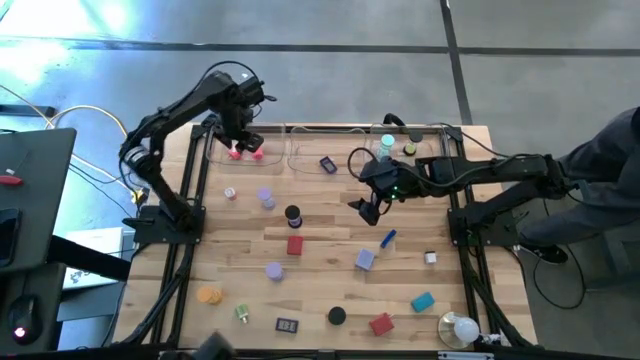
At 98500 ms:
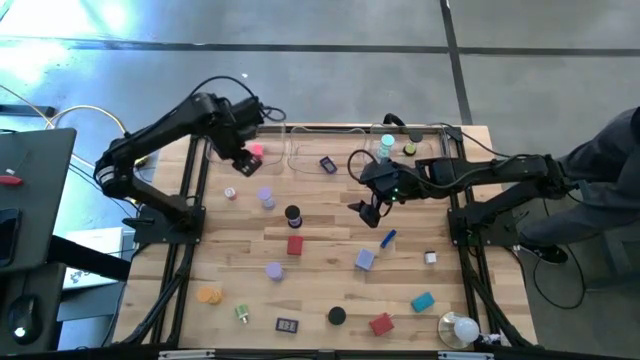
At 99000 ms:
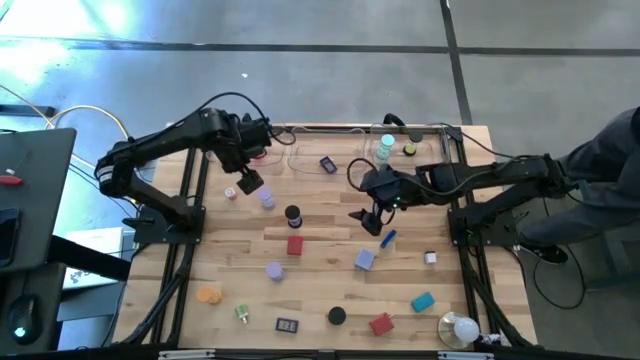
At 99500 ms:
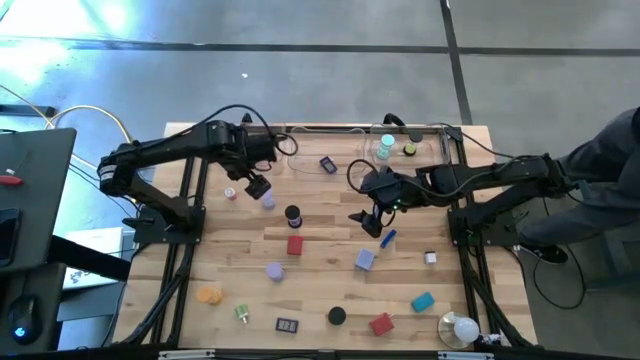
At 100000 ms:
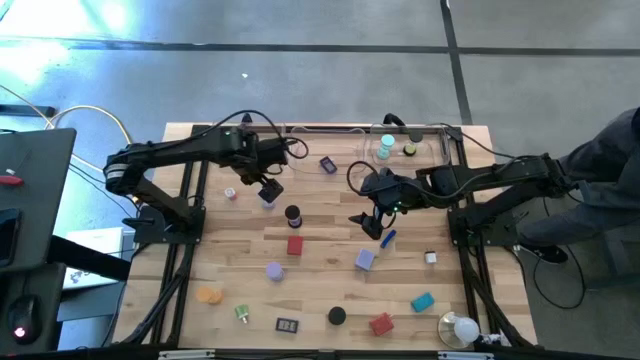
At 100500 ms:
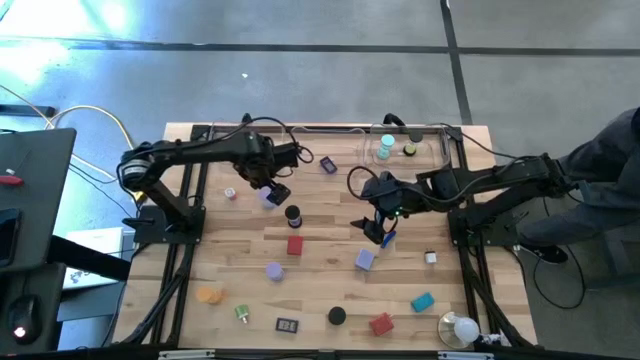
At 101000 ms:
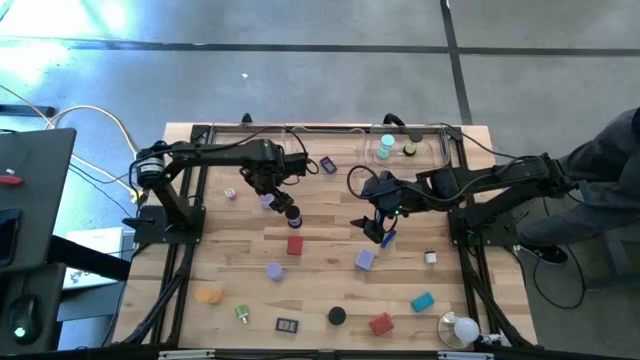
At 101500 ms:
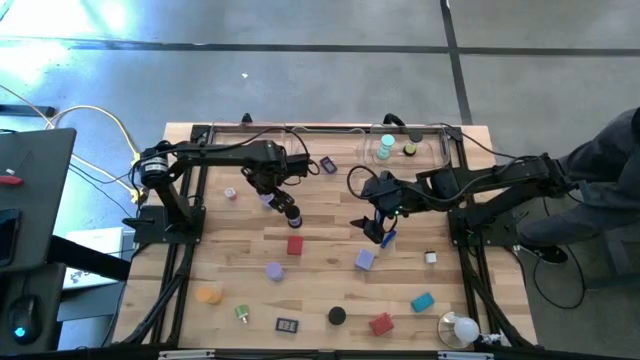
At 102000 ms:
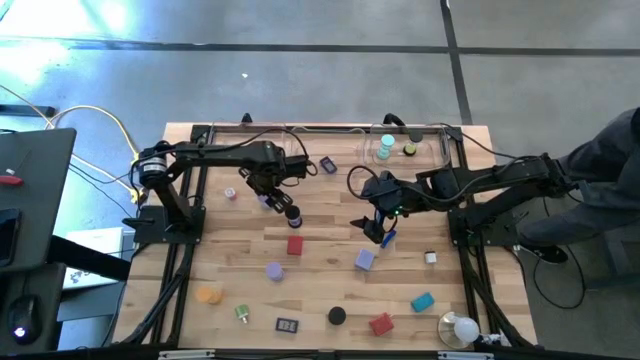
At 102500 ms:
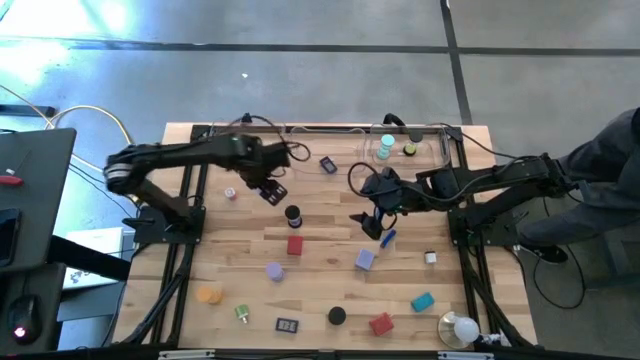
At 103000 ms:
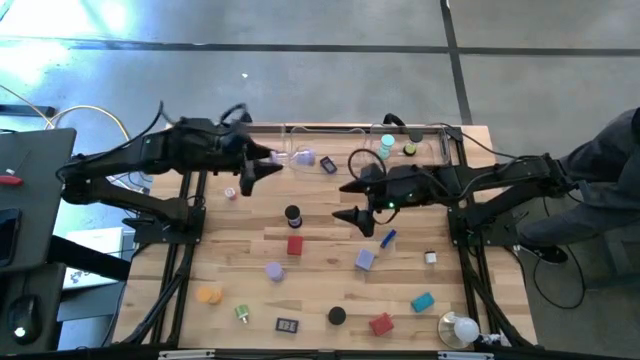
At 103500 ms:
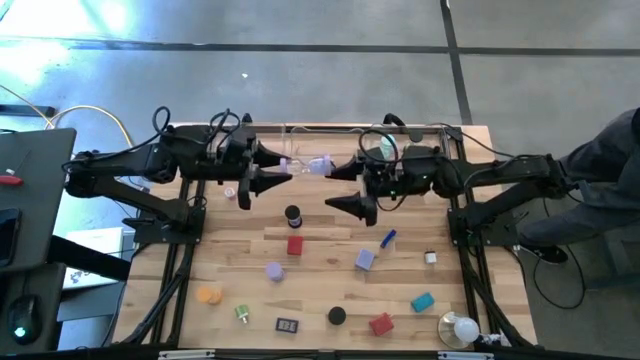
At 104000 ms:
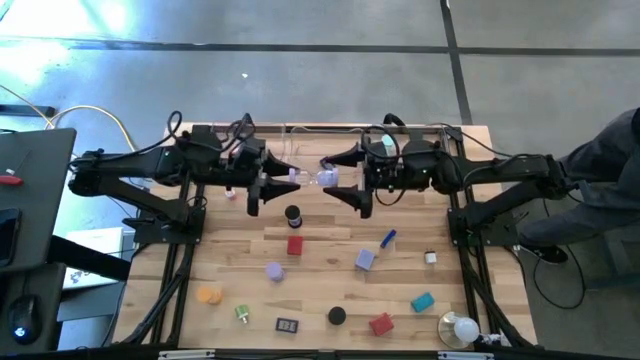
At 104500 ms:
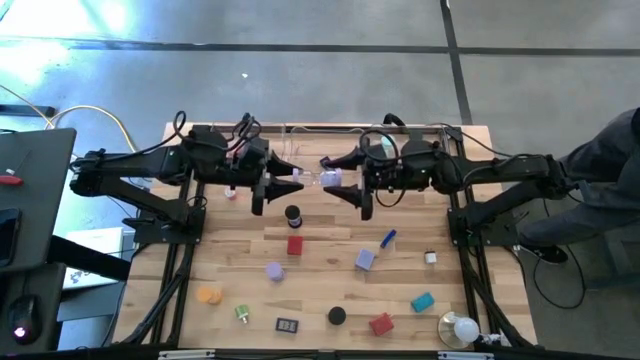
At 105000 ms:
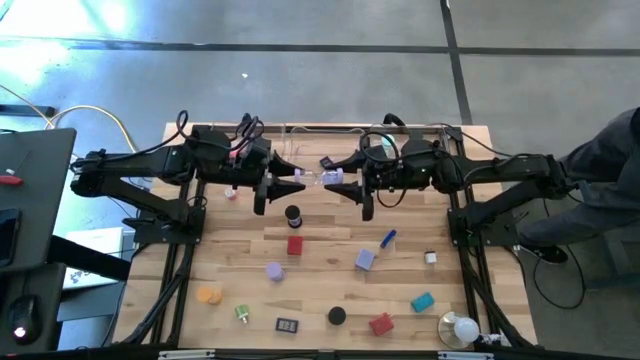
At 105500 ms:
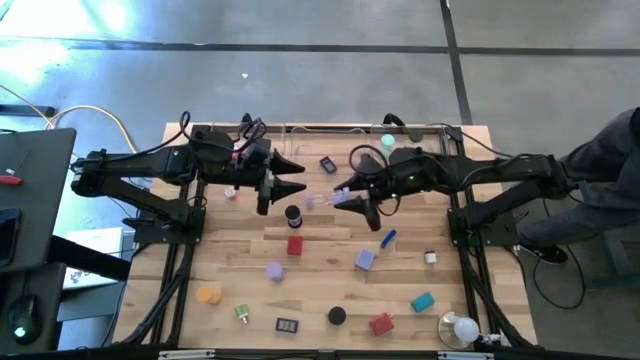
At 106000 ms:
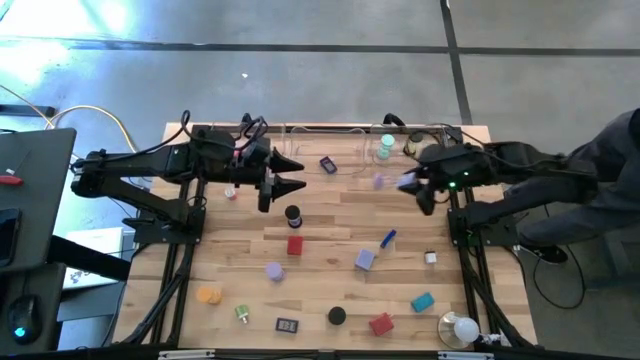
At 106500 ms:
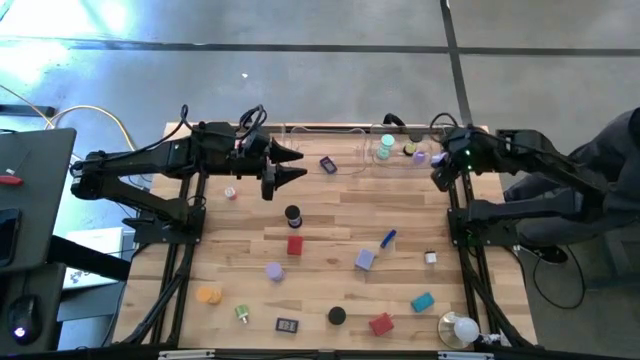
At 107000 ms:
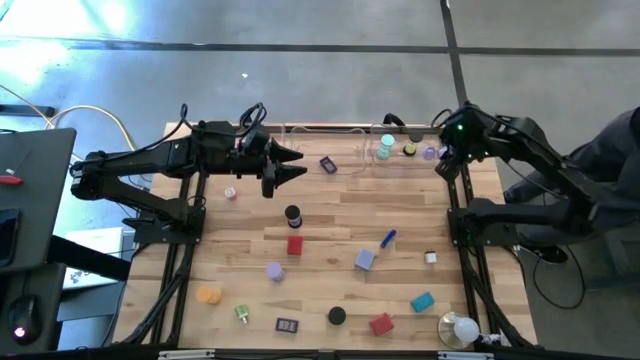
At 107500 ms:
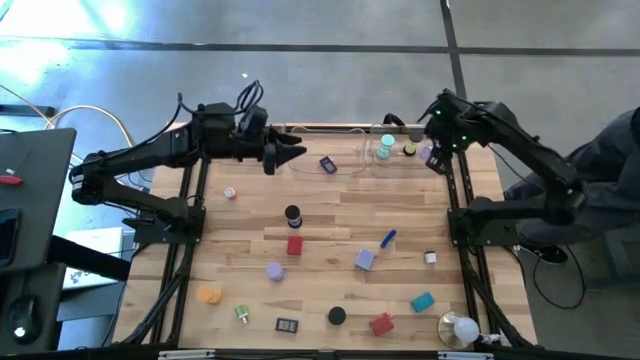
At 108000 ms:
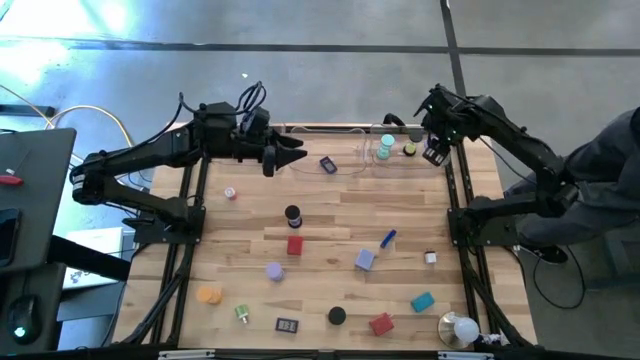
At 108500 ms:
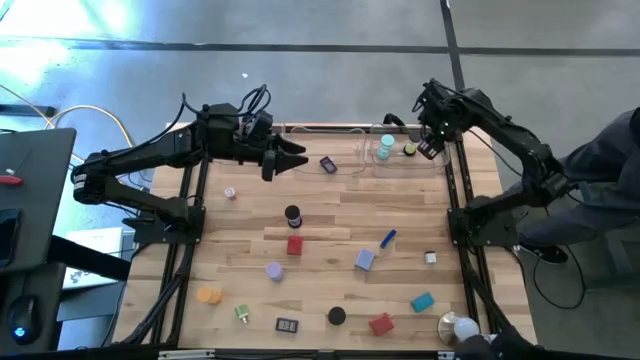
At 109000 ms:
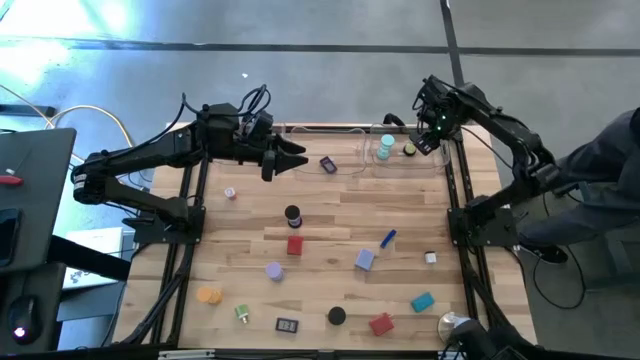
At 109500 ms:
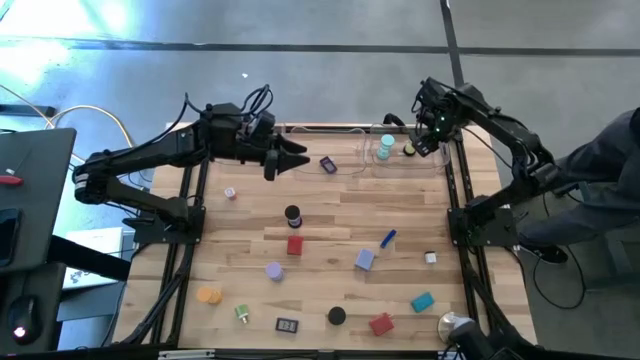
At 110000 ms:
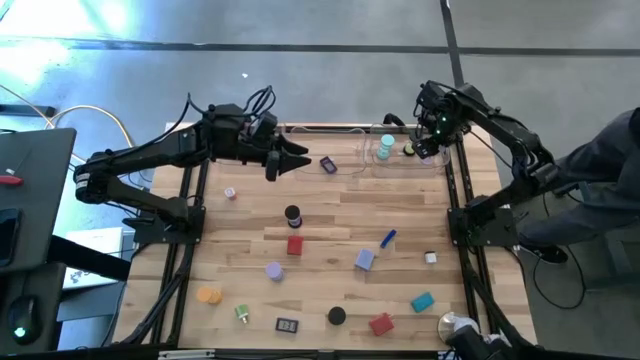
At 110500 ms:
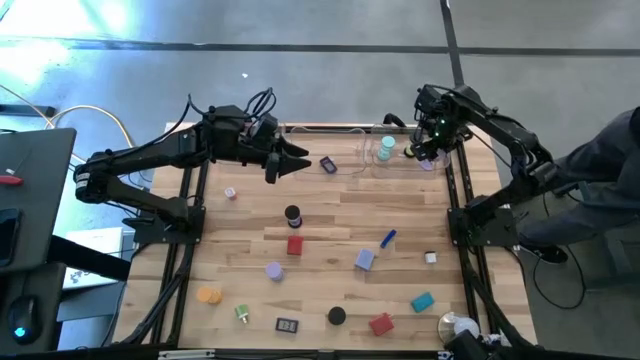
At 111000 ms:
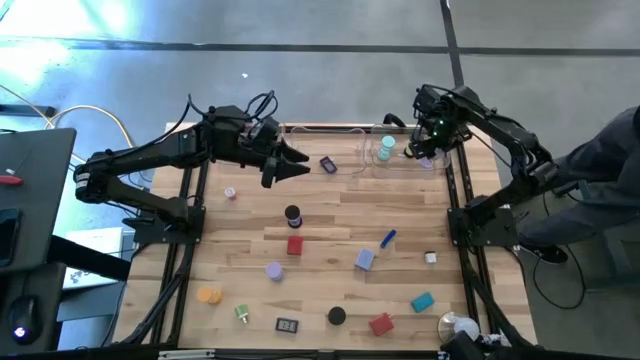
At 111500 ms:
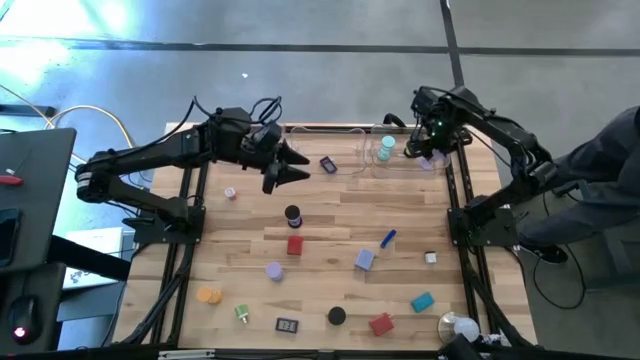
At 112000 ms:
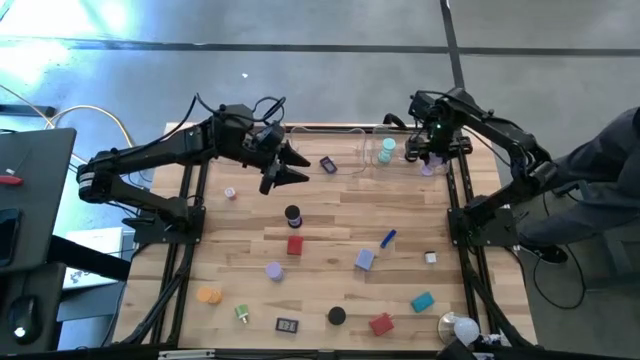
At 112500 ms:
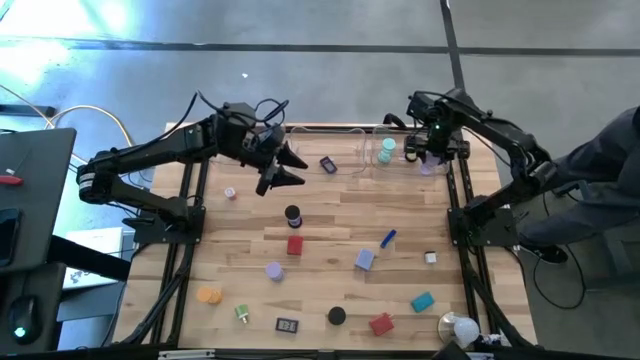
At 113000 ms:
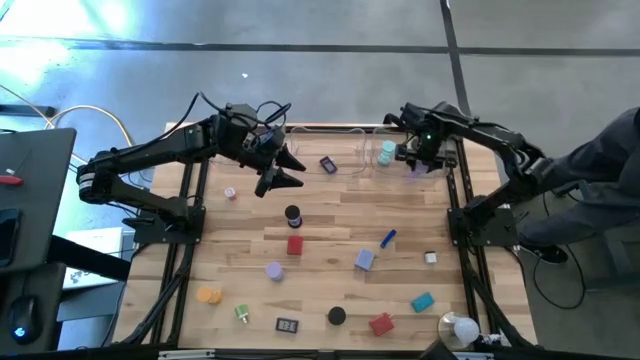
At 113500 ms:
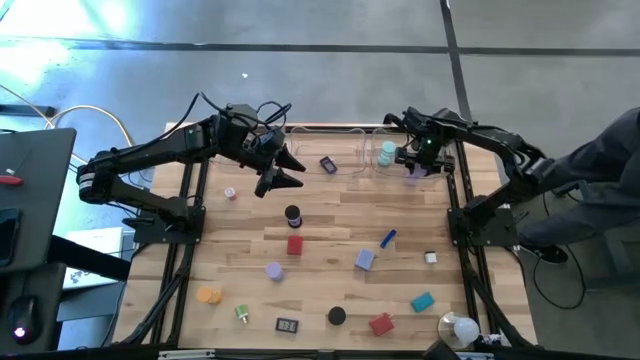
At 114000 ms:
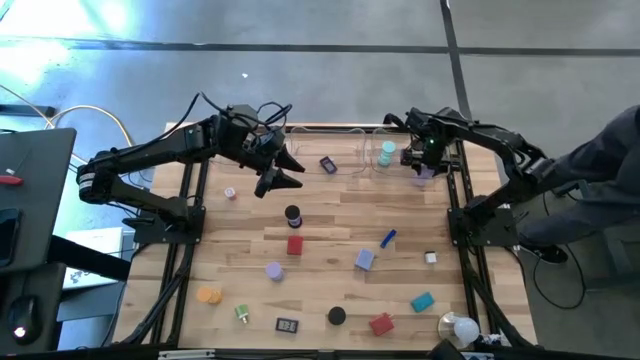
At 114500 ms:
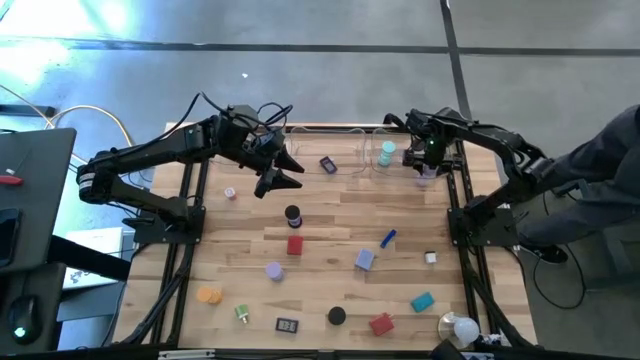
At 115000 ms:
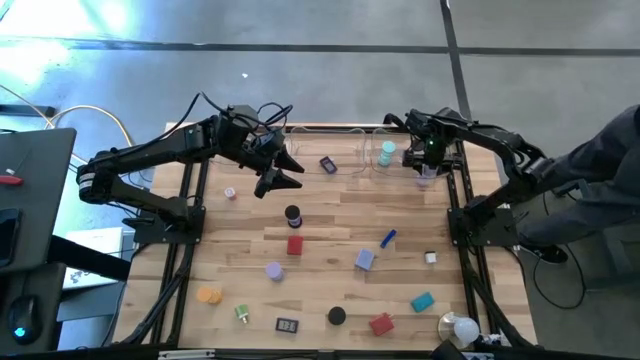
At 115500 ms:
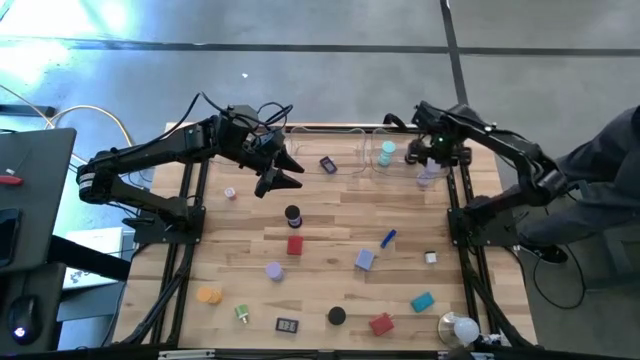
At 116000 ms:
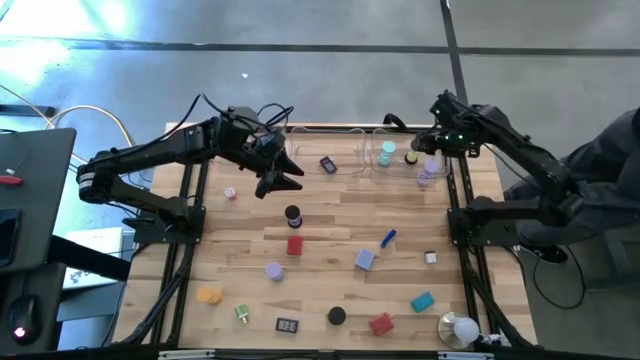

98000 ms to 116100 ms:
Task: Pick & Place Office items
Put the top light purple hourglass into the right transparent bin

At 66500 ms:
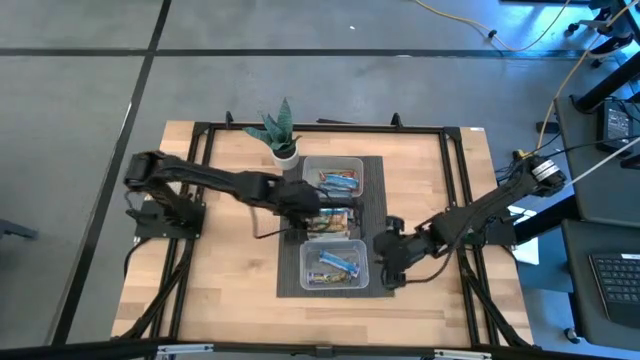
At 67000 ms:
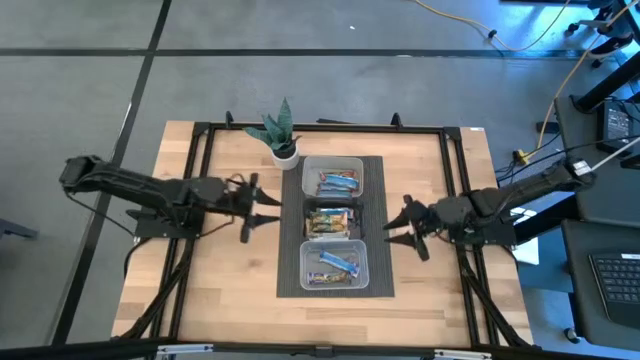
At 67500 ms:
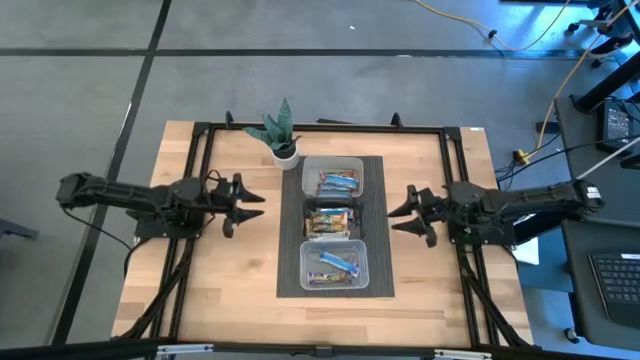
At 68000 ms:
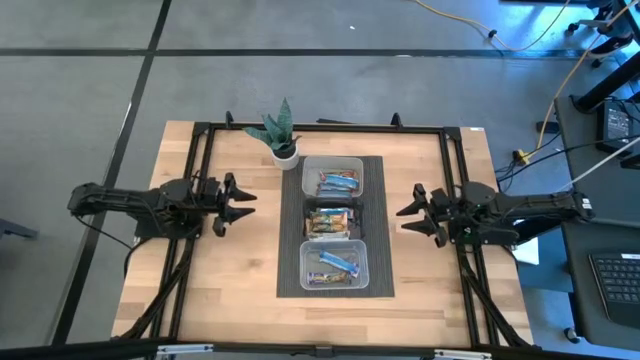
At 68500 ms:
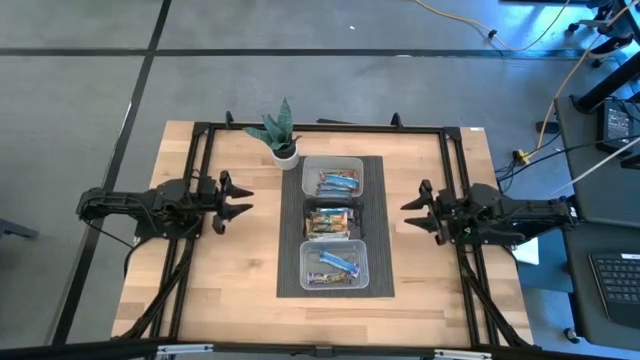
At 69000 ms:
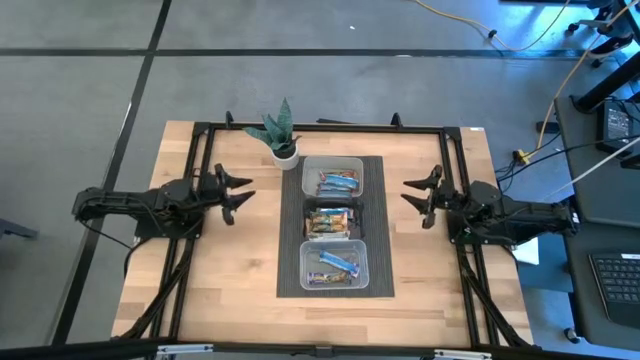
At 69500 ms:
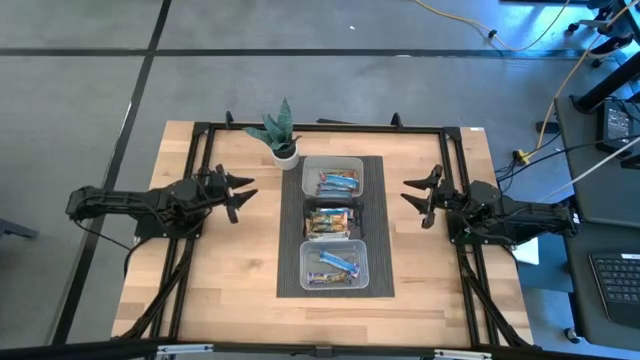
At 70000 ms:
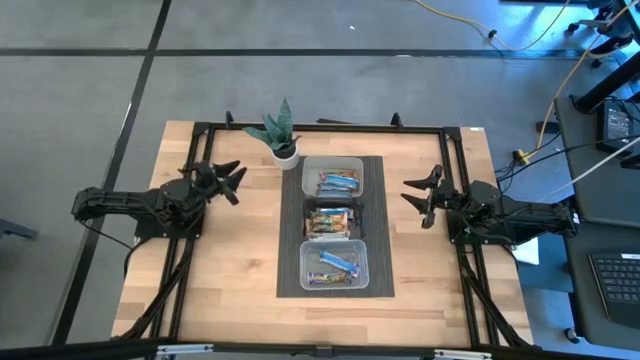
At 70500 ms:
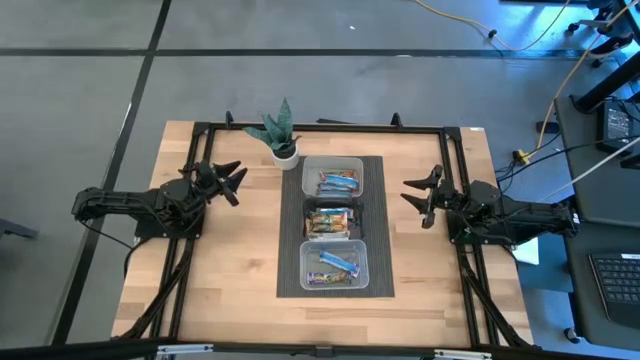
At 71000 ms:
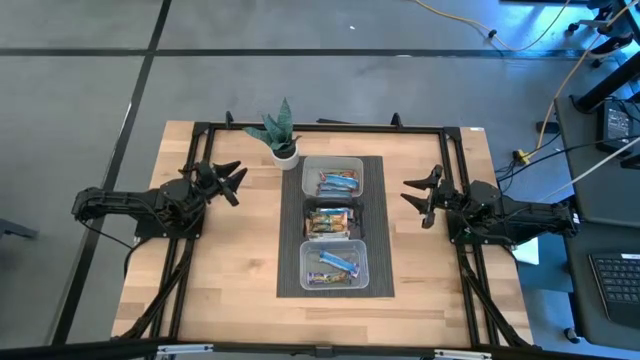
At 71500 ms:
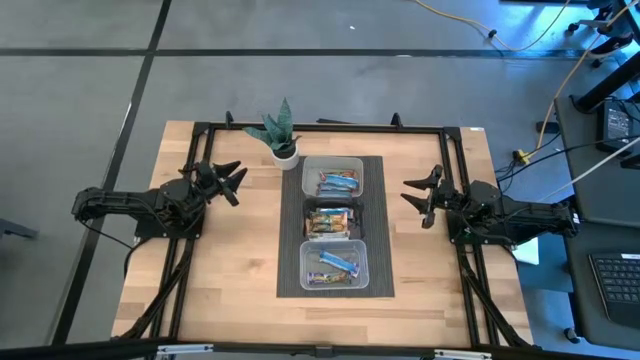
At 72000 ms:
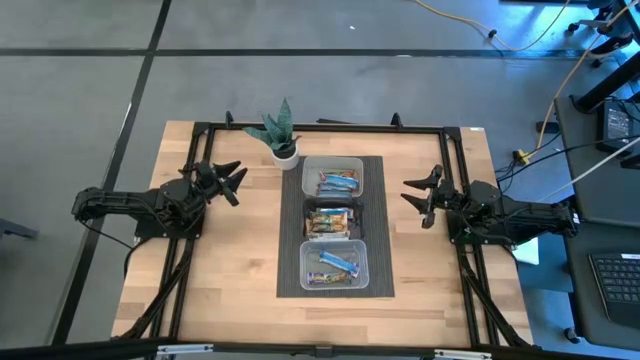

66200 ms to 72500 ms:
Task: Pick and place Granola Bars by type
Return to Home Position
